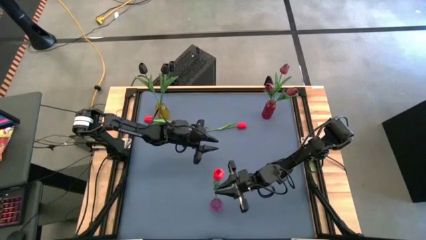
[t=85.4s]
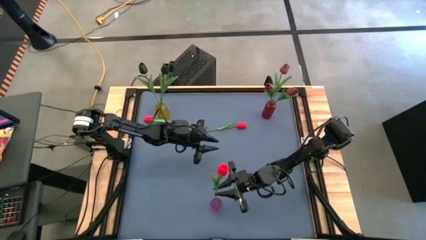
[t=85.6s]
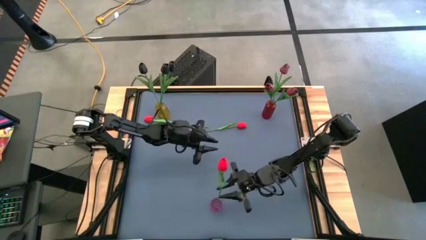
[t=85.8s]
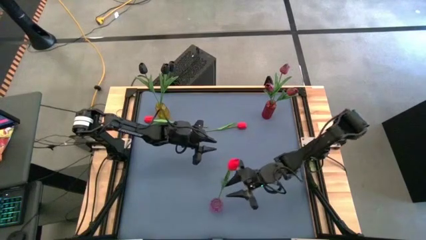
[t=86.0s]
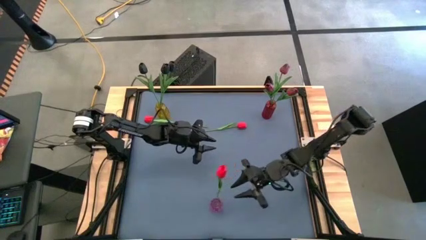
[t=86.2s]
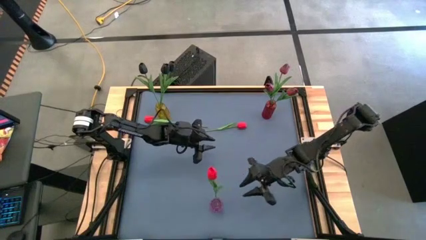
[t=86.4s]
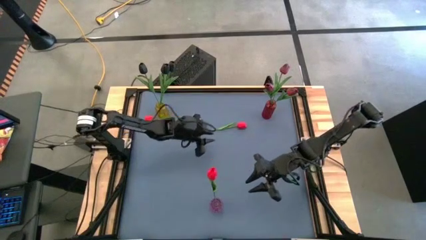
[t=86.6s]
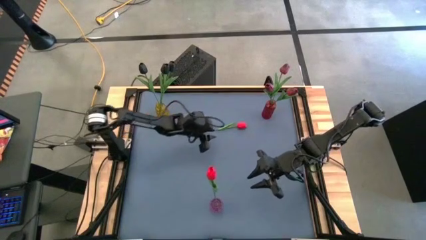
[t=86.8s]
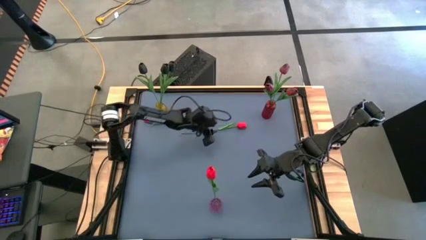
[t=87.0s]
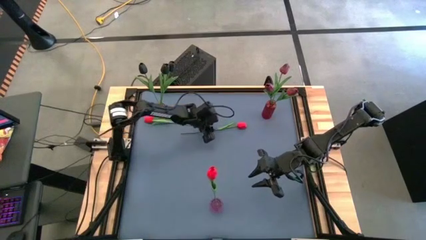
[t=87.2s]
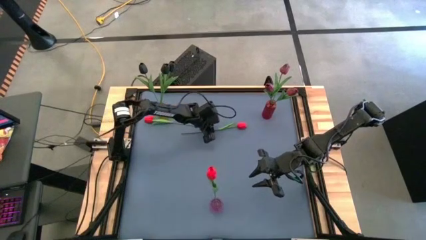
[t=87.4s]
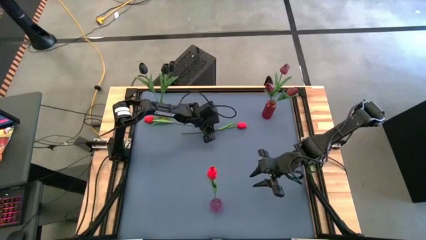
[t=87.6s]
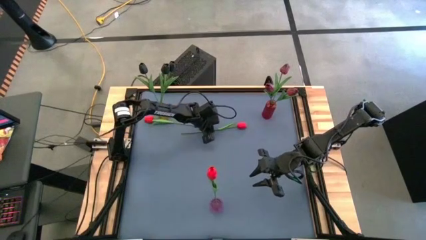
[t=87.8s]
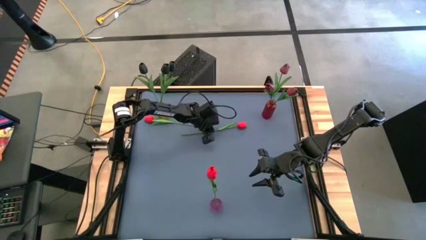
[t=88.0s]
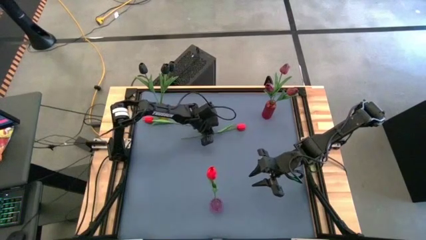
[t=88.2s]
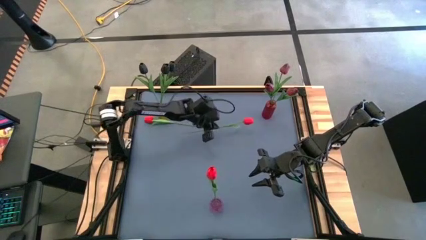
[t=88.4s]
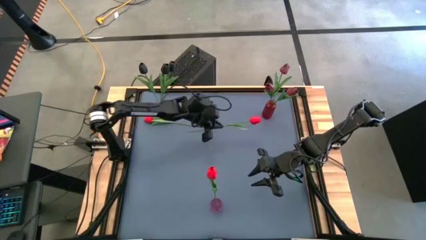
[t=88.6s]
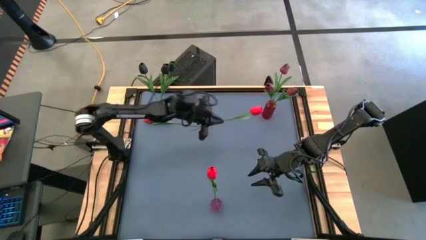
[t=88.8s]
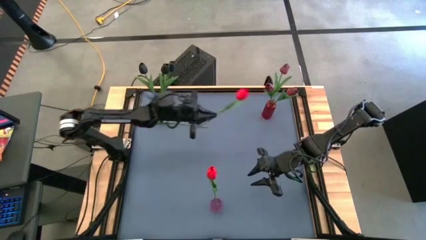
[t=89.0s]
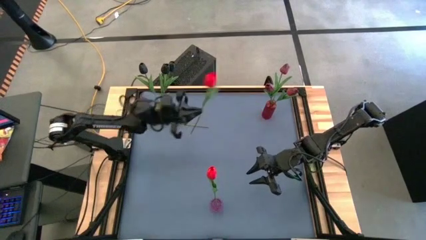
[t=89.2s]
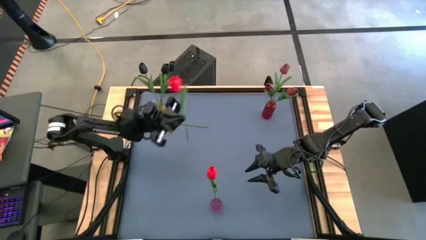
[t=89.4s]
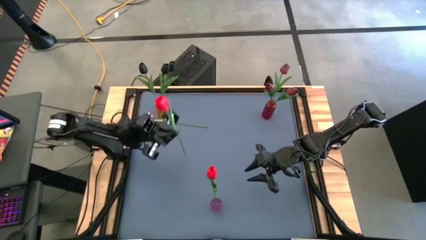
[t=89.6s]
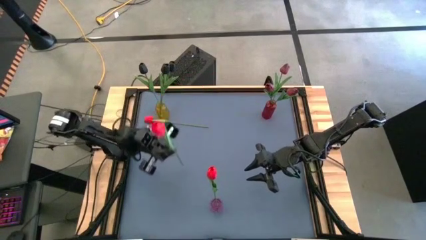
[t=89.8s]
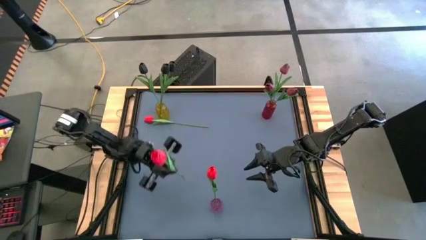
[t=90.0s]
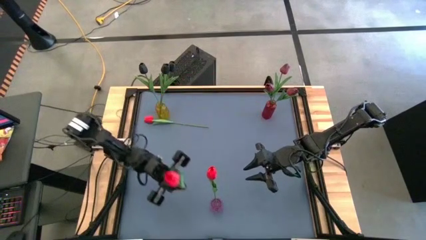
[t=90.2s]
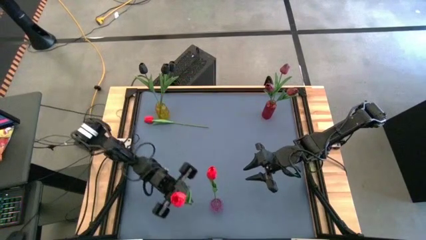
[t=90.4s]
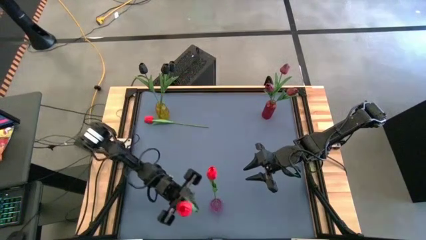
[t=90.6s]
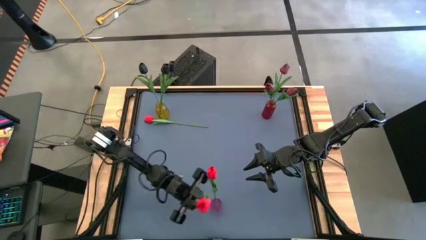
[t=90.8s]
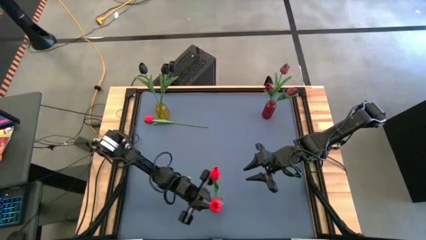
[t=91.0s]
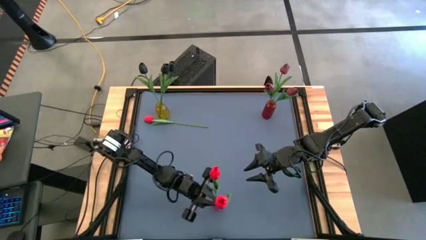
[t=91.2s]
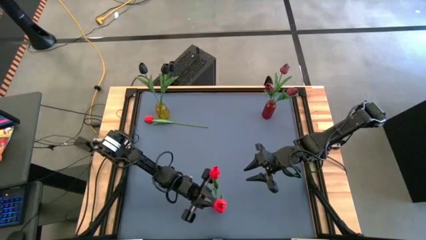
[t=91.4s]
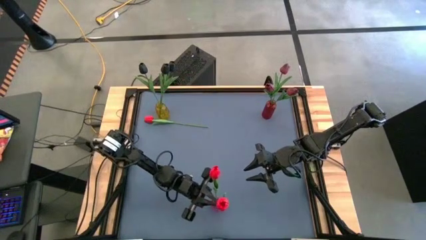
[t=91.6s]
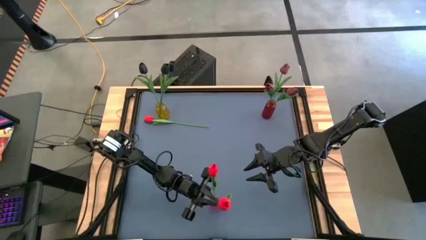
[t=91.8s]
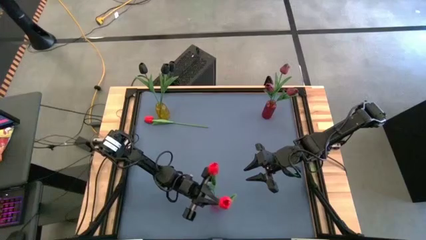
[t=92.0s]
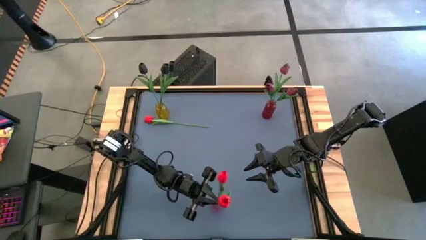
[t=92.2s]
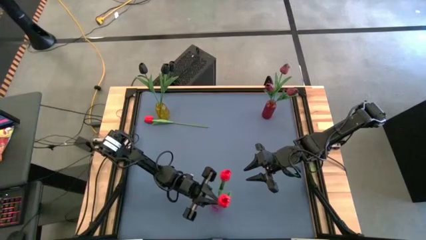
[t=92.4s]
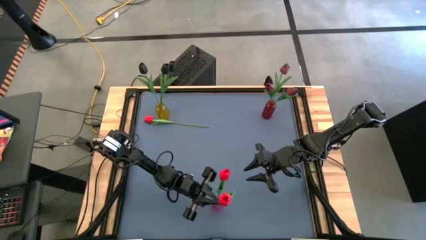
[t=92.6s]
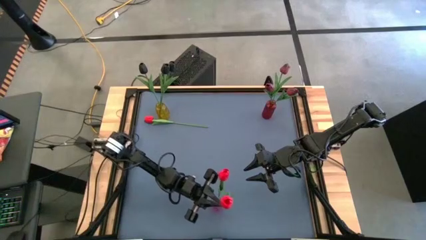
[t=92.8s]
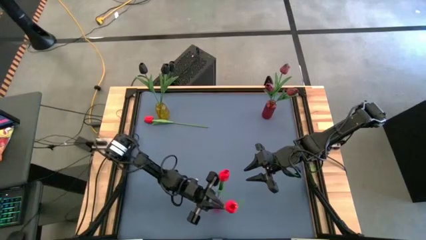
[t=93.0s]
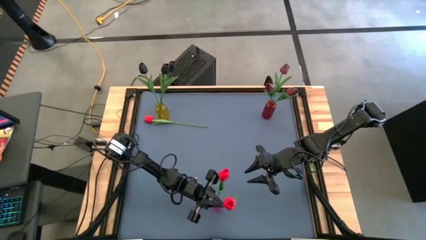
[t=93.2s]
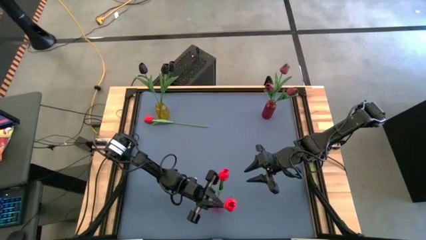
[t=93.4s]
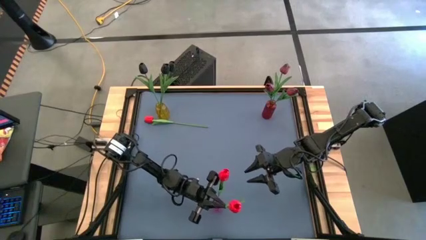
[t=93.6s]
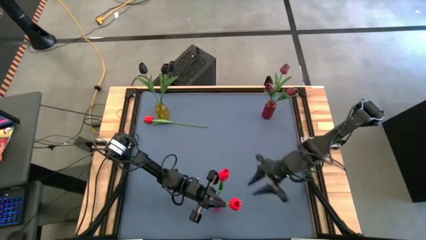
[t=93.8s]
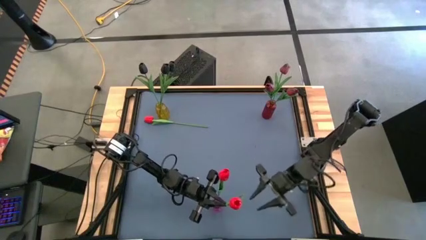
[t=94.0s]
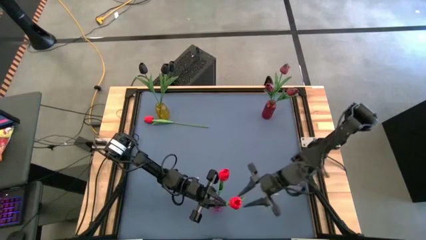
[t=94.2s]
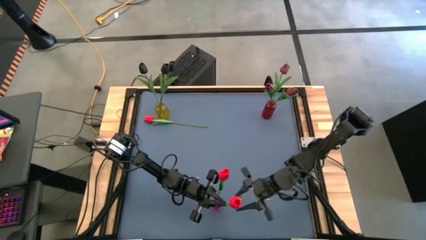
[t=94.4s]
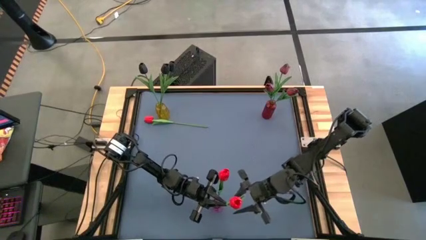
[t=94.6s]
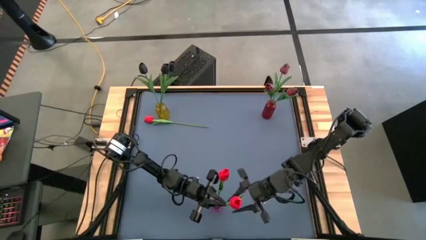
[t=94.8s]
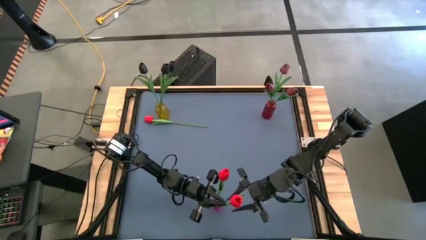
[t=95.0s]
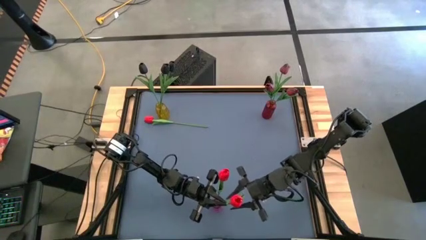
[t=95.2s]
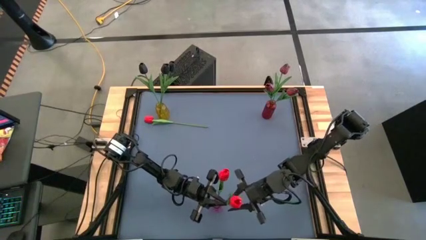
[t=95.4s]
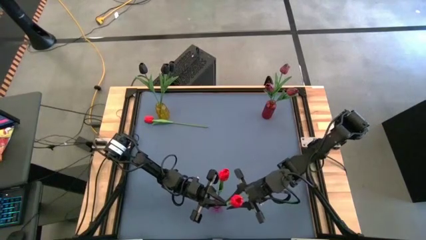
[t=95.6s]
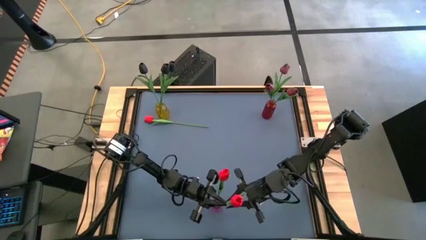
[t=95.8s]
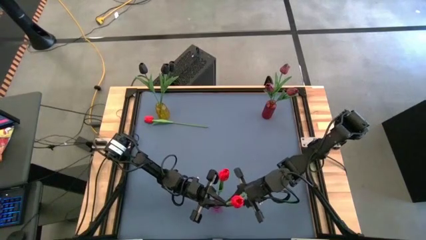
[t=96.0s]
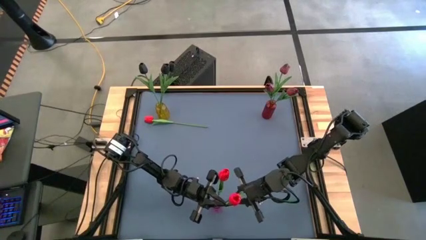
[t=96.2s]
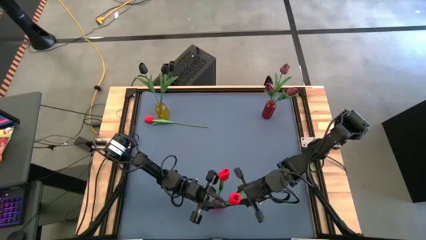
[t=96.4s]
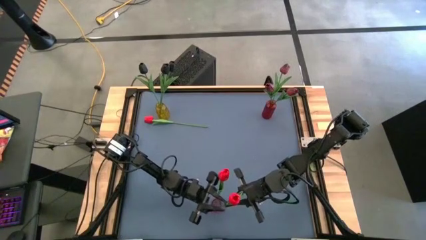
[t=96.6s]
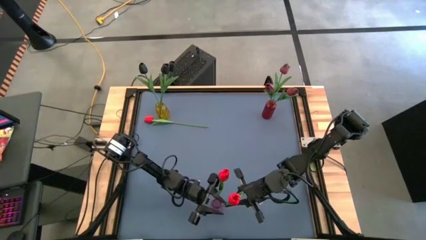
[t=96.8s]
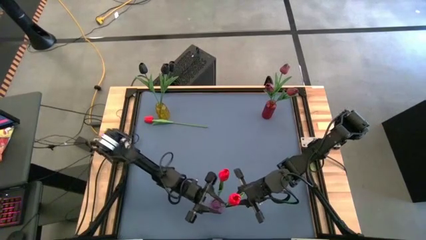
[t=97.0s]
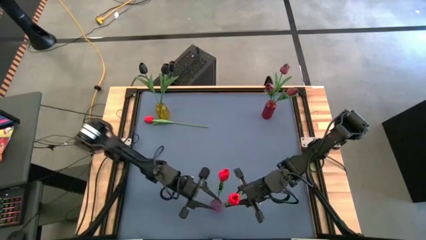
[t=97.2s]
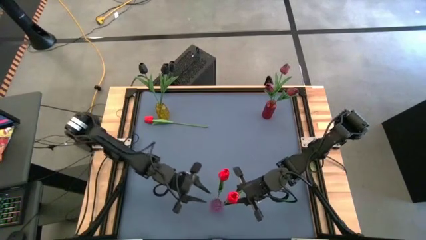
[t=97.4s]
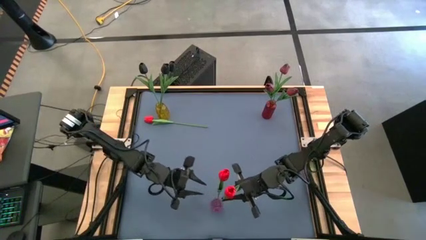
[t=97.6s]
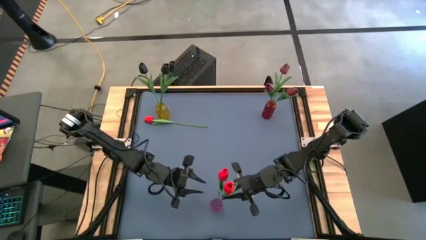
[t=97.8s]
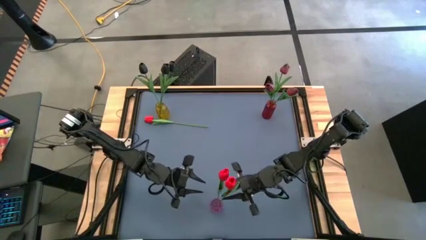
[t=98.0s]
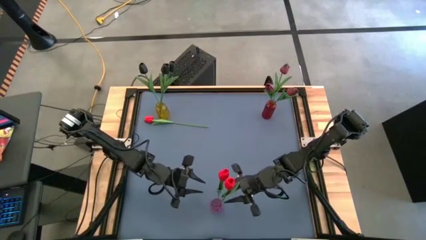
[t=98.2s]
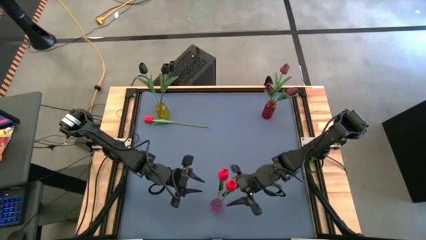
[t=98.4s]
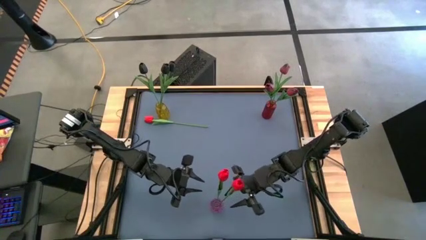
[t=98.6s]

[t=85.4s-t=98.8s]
Task: Sort flowers into vase by color
Put the right red flower into the violet vase

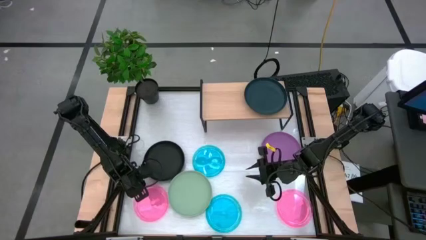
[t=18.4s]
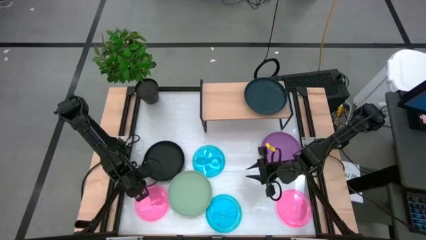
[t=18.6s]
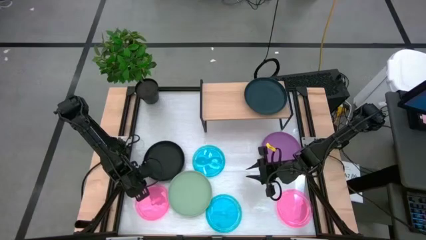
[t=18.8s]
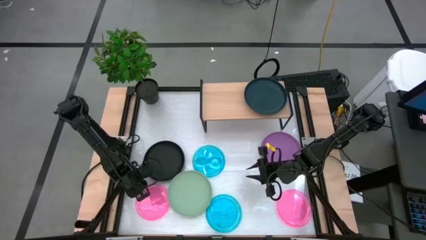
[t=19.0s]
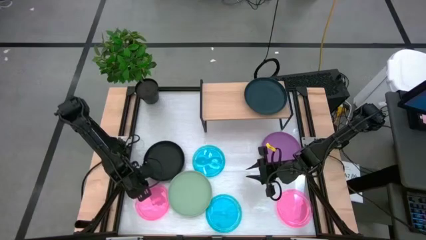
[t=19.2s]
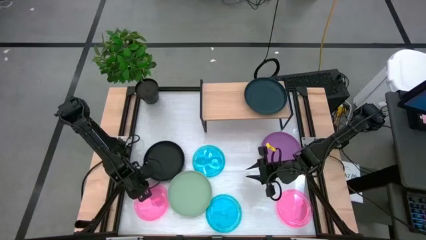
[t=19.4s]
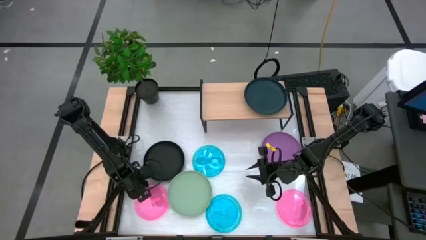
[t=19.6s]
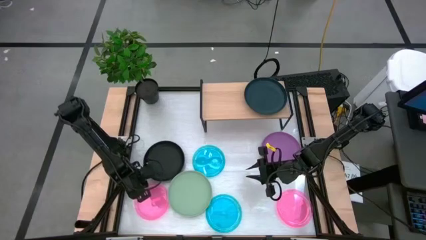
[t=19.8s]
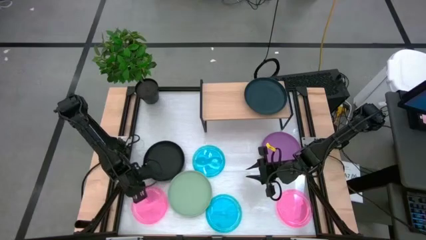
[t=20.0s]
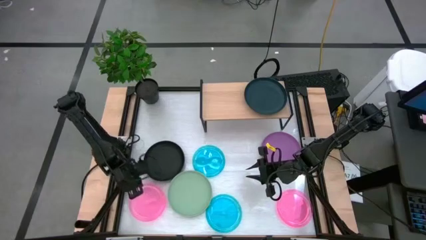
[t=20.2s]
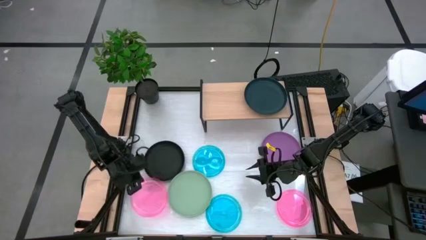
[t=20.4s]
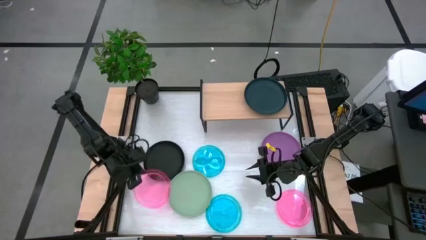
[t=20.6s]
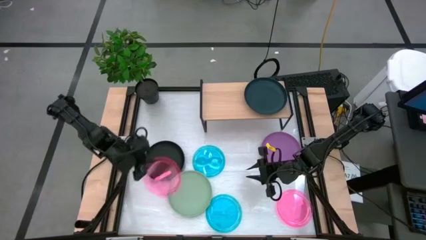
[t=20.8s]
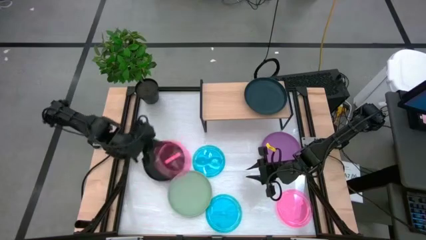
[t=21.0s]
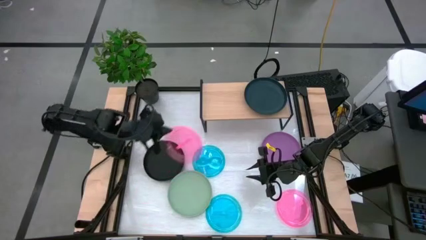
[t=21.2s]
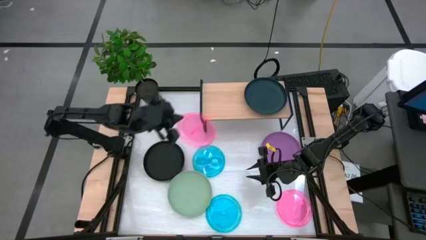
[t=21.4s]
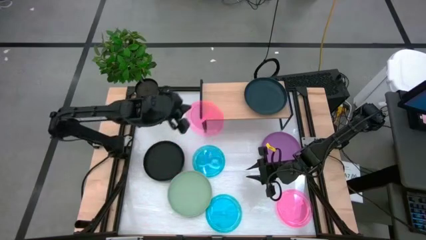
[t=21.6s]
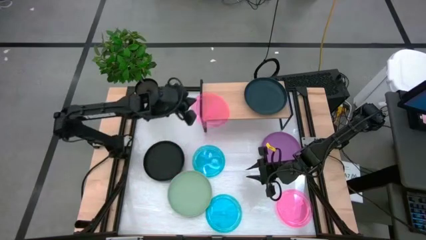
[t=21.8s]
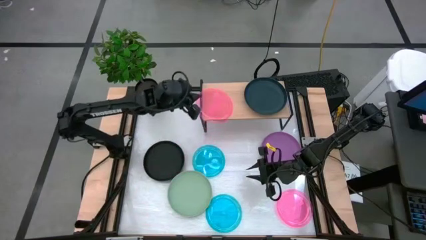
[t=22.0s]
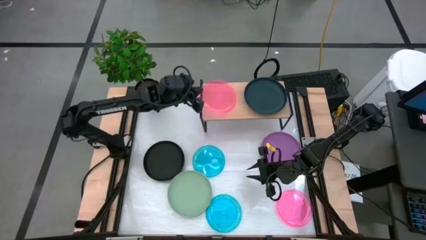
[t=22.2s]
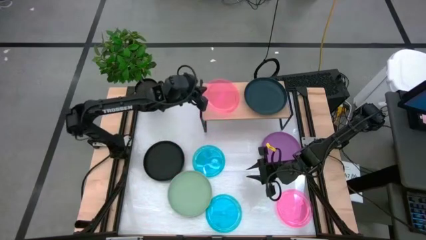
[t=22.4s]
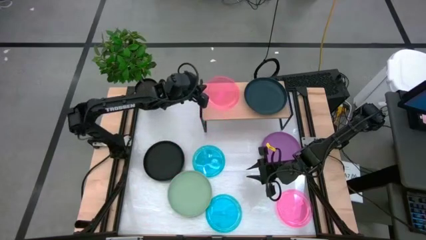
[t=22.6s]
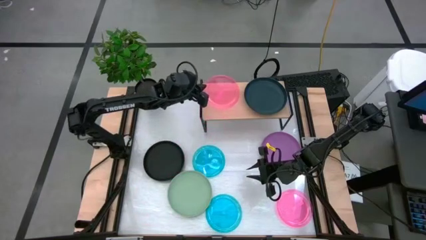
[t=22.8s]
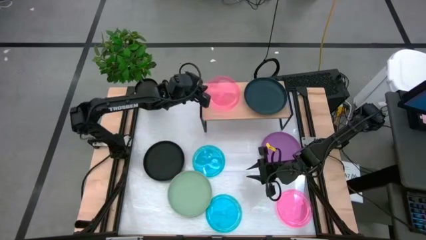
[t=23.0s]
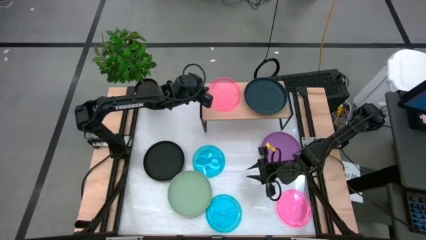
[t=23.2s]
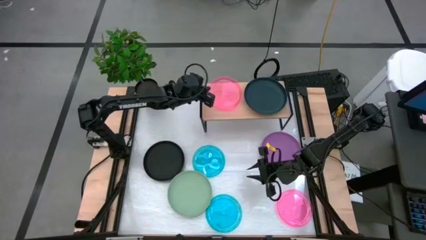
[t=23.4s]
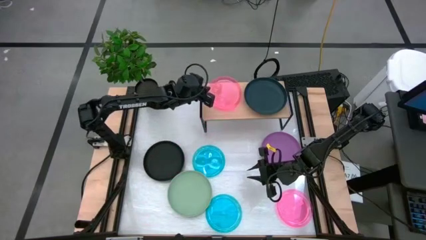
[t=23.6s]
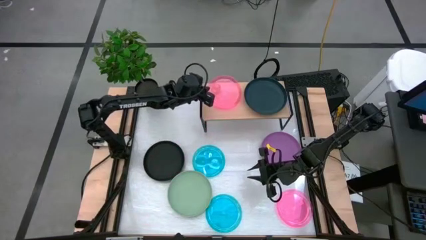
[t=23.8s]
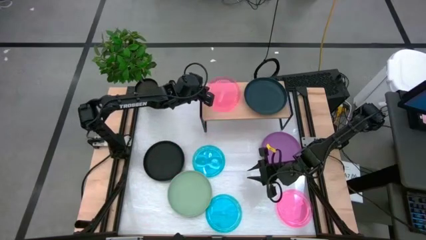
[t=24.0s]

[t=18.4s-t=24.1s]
Task: Place and stack plates onto a shelf
Put the left pink plate on the shelf
